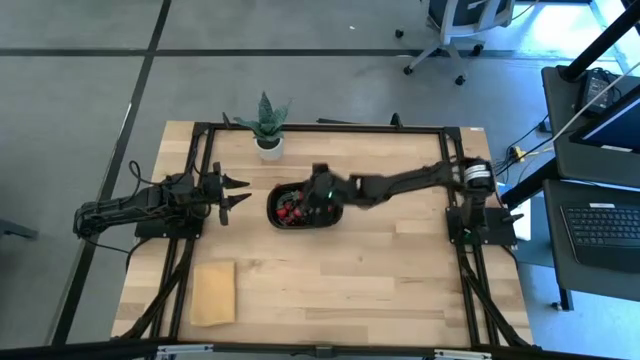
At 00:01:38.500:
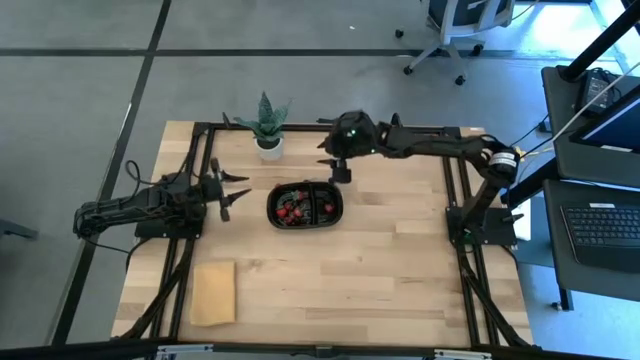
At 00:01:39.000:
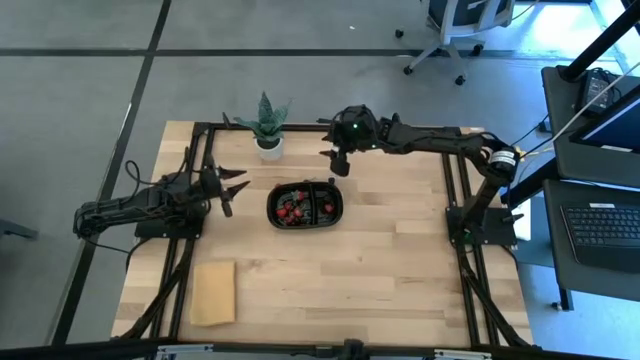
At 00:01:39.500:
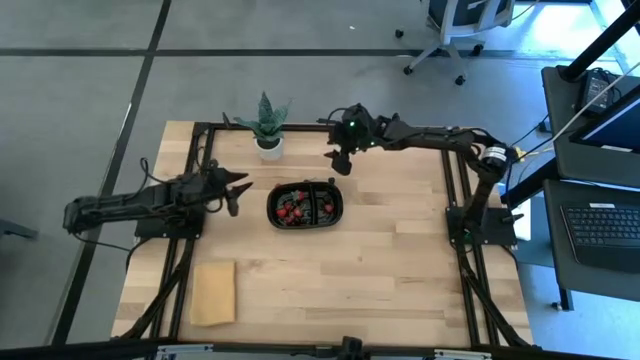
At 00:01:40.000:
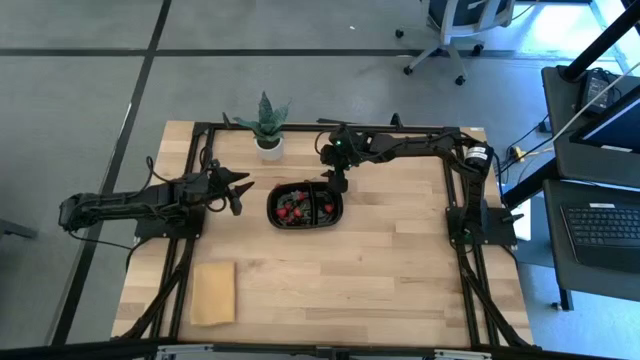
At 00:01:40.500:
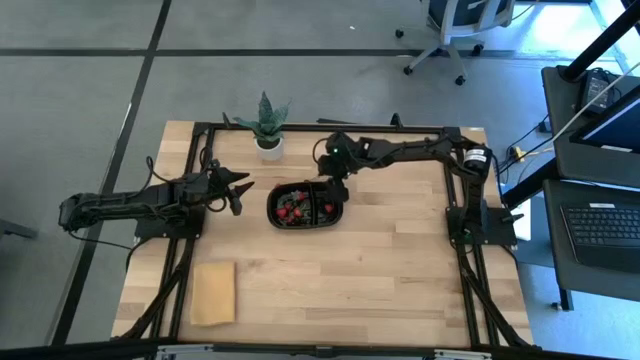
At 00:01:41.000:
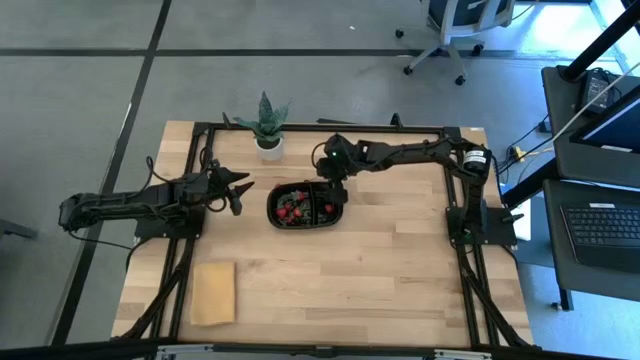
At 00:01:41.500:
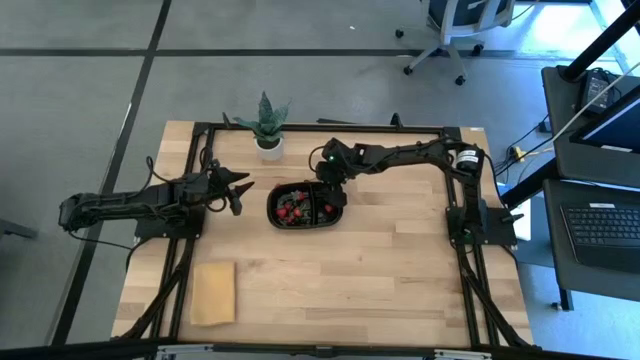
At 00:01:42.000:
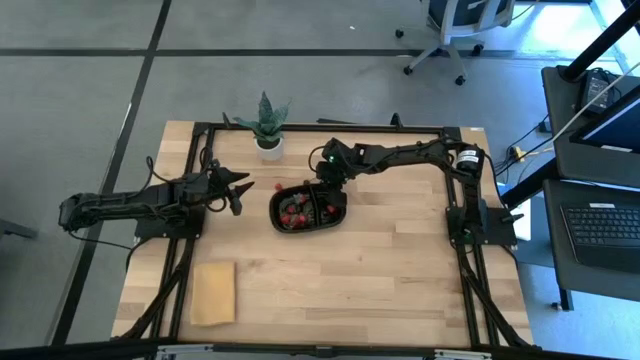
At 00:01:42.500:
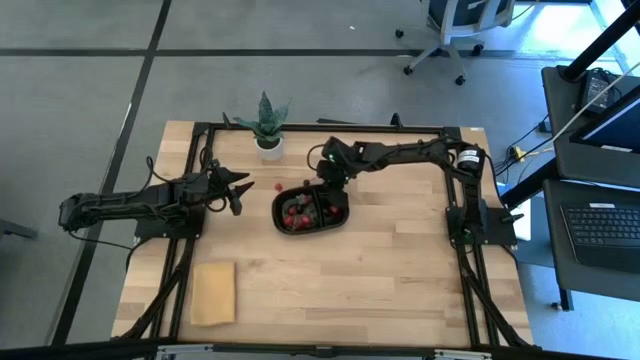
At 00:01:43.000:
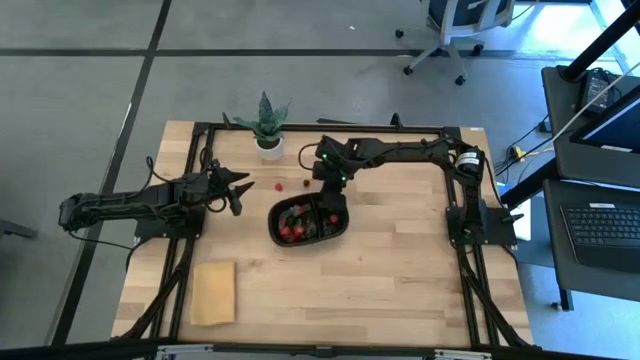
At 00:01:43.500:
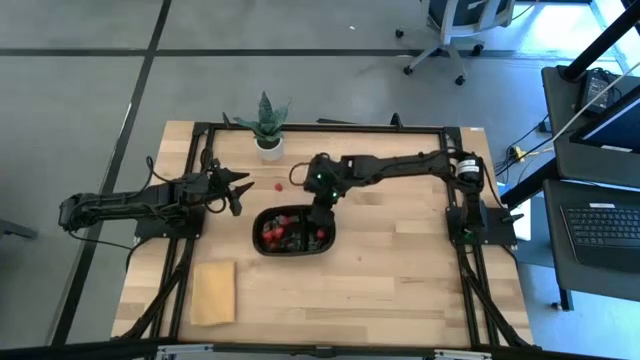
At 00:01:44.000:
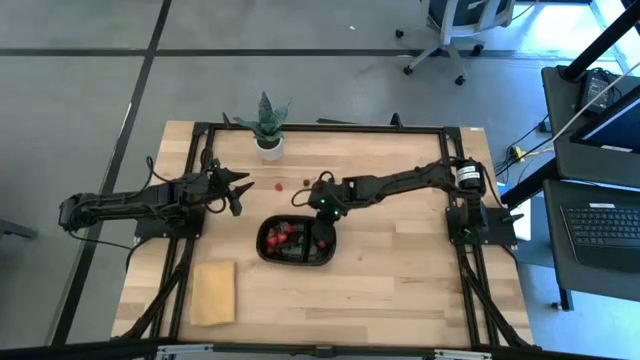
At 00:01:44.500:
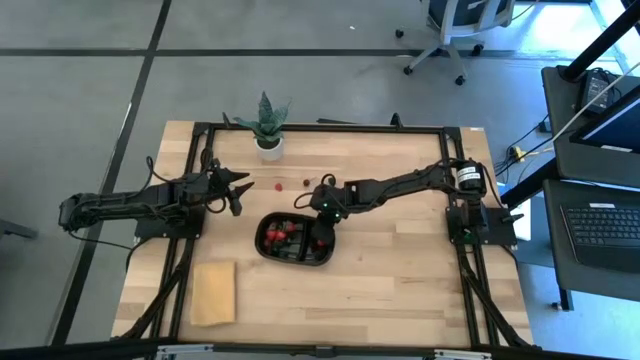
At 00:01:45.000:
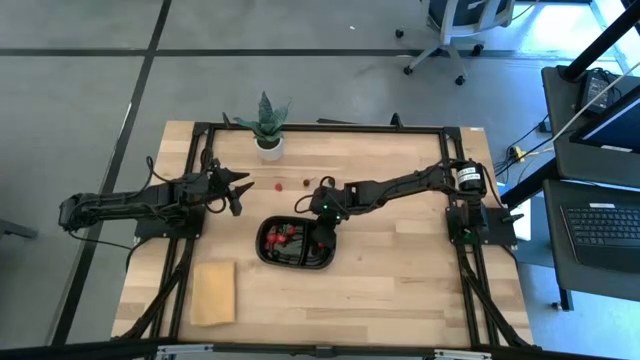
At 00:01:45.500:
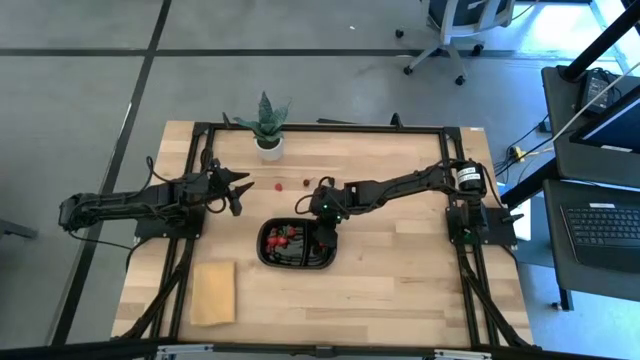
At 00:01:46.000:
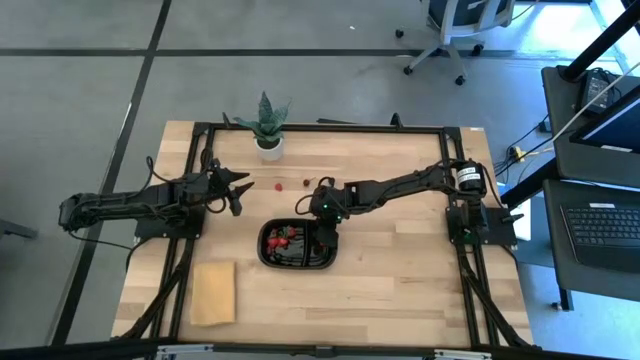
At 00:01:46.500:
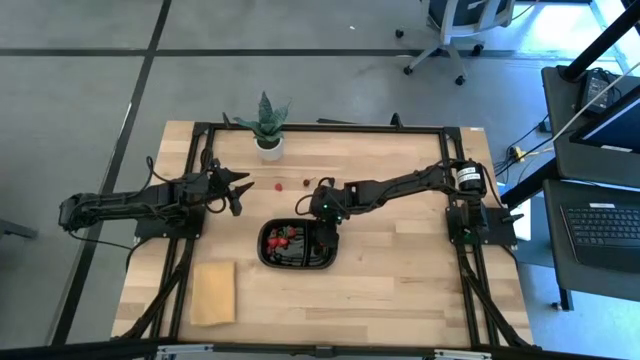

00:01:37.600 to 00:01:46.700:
Task: Pick and placing Produce into tupperware
Move the black bin to the middle left of the table

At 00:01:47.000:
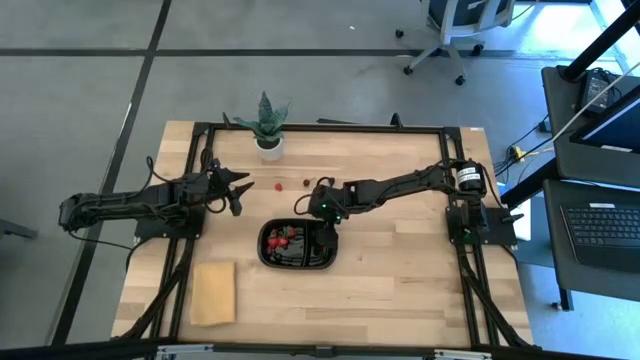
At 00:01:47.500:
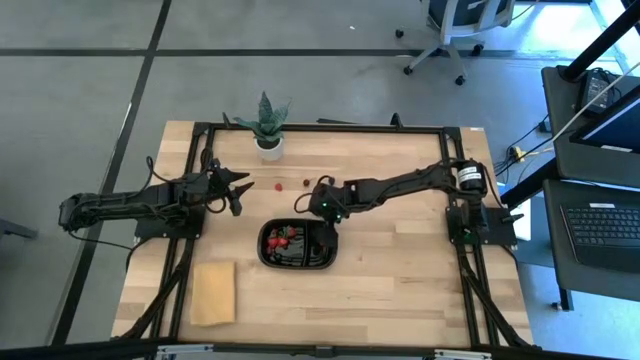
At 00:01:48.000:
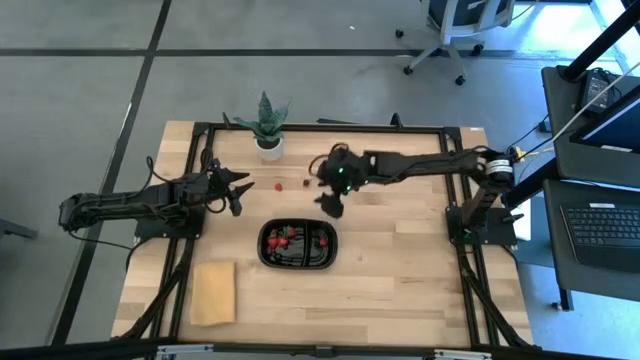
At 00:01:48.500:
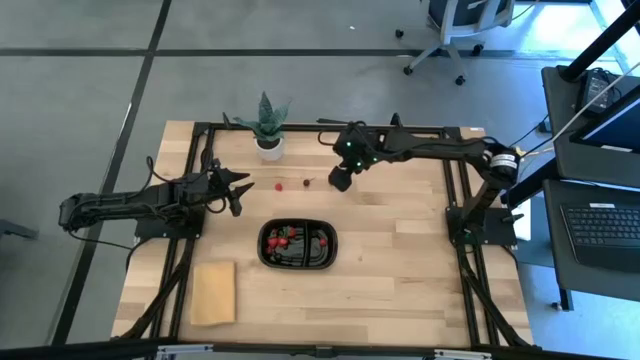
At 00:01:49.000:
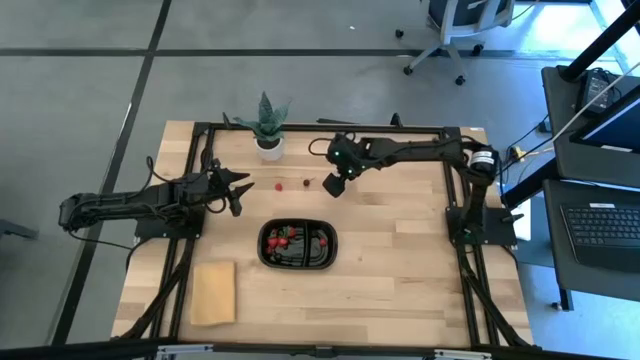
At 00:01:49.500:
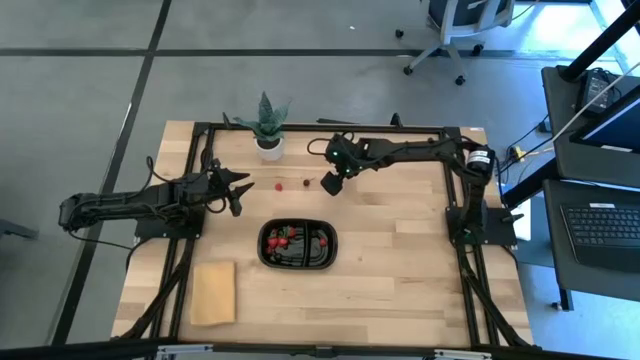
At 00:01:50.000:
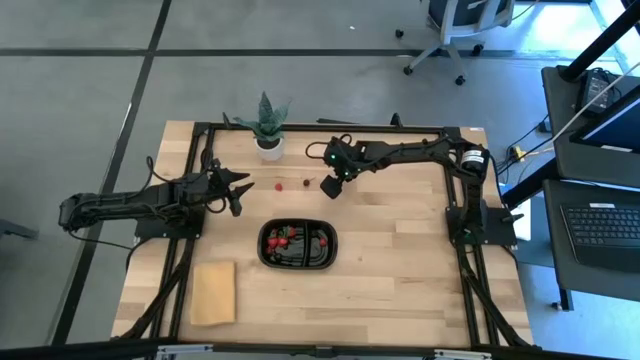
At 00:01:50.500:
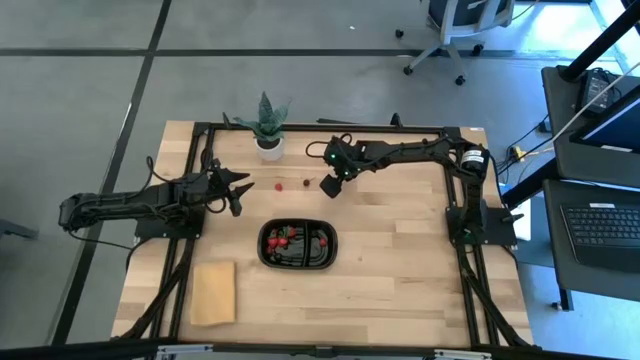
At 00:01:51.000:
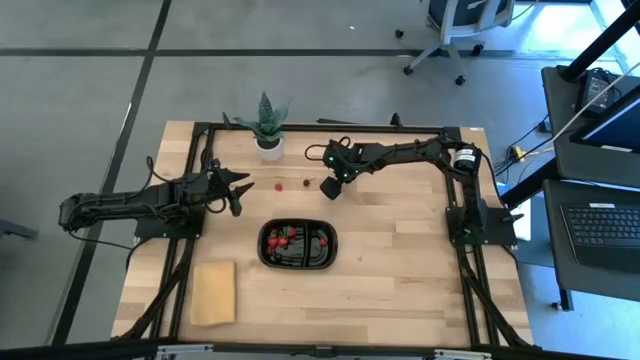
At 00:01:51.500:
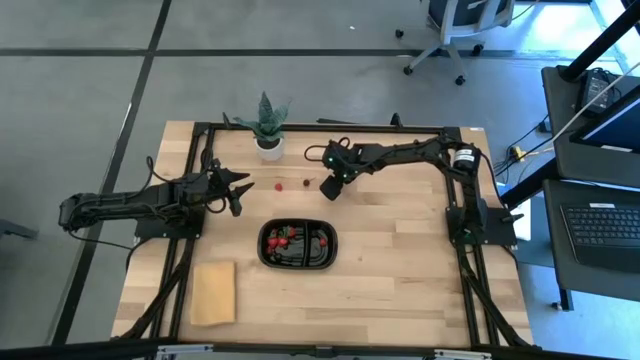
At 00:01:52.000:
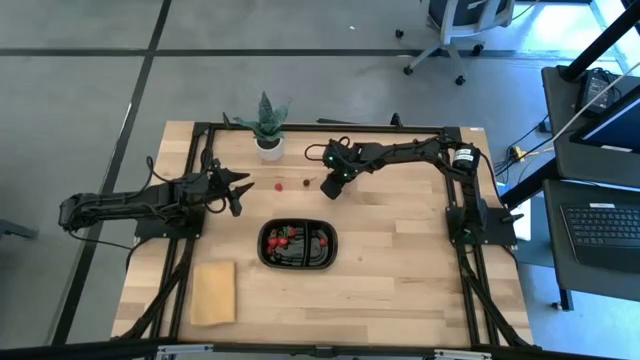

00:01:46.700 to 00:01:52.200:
Put the blackberry into the black bin

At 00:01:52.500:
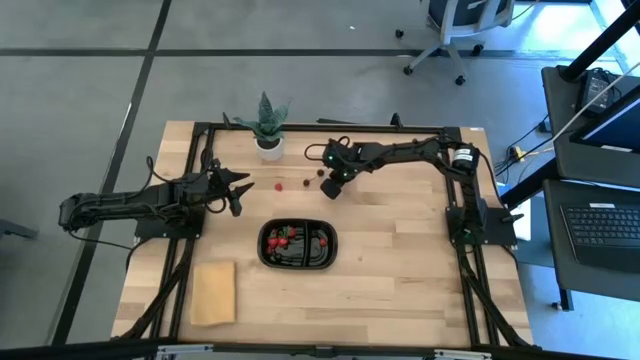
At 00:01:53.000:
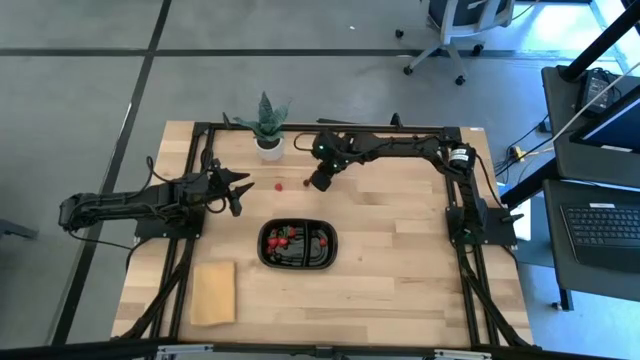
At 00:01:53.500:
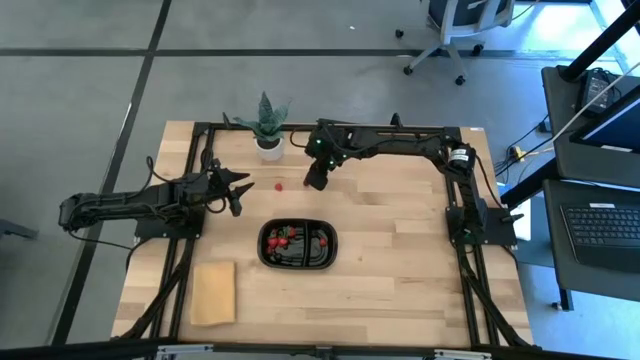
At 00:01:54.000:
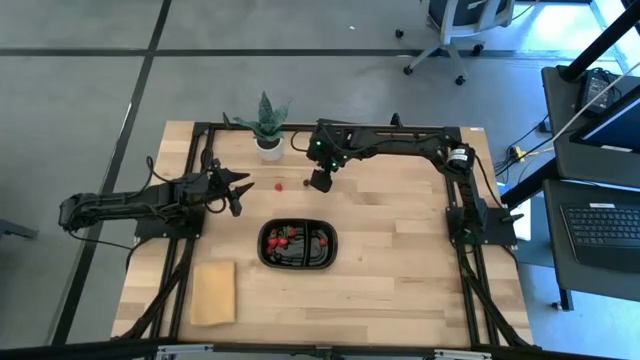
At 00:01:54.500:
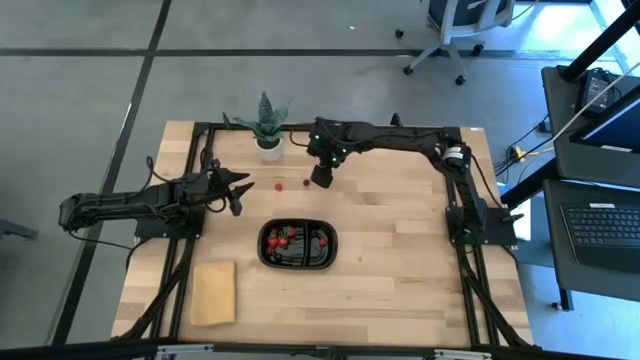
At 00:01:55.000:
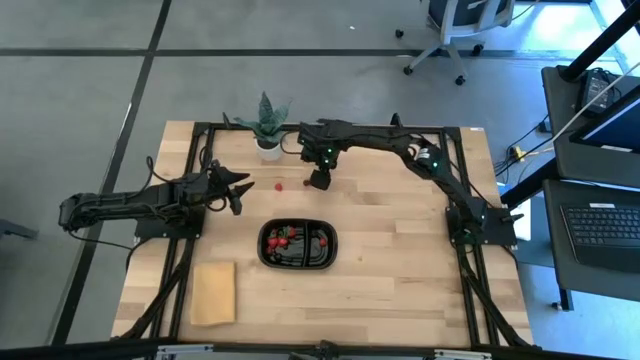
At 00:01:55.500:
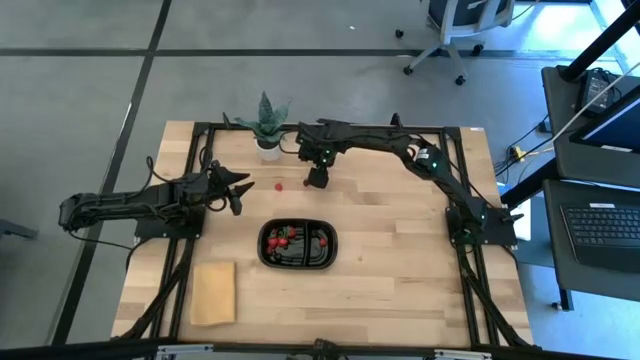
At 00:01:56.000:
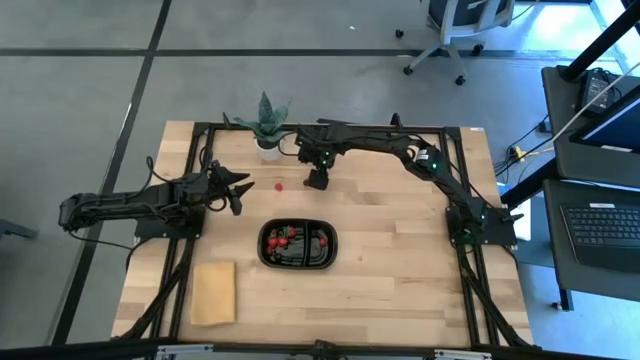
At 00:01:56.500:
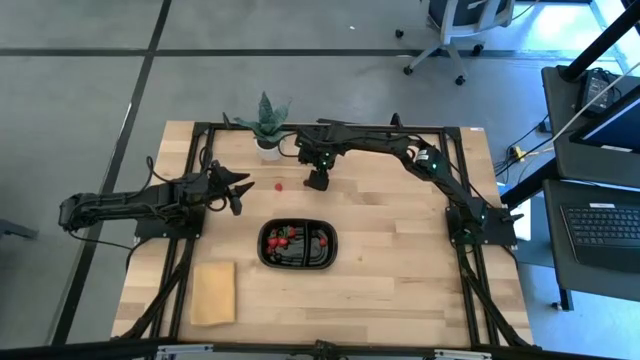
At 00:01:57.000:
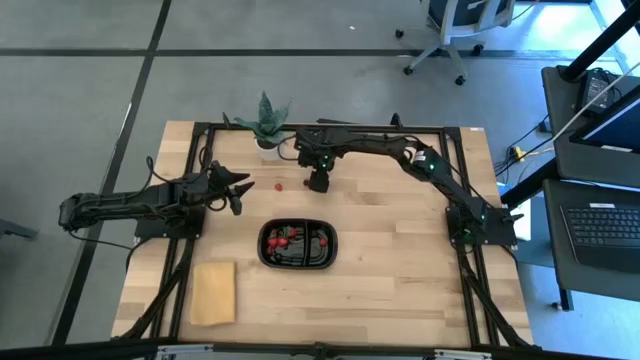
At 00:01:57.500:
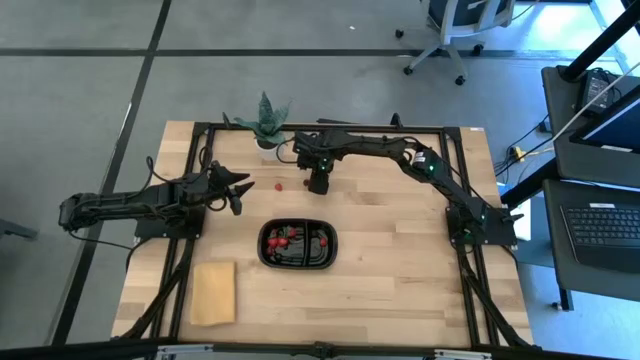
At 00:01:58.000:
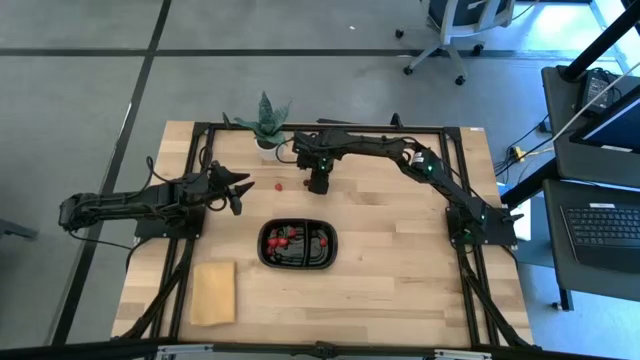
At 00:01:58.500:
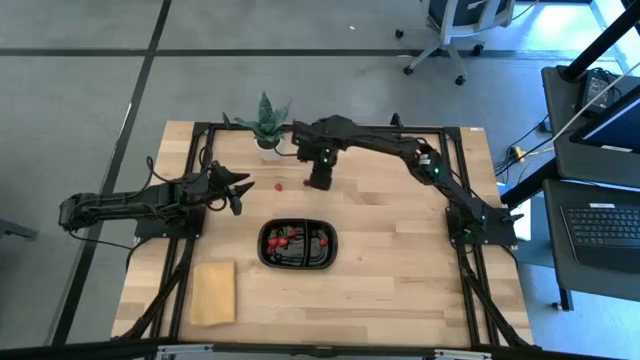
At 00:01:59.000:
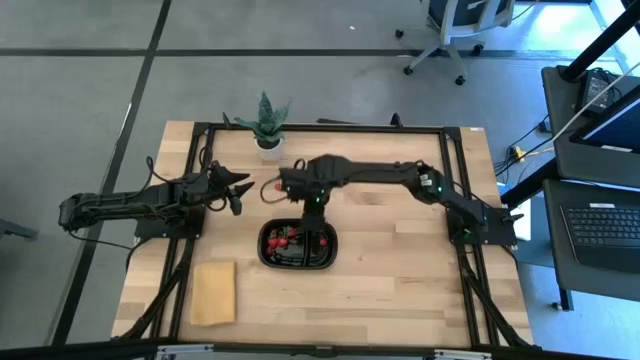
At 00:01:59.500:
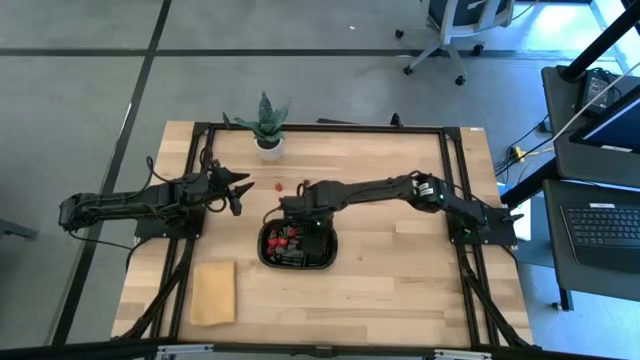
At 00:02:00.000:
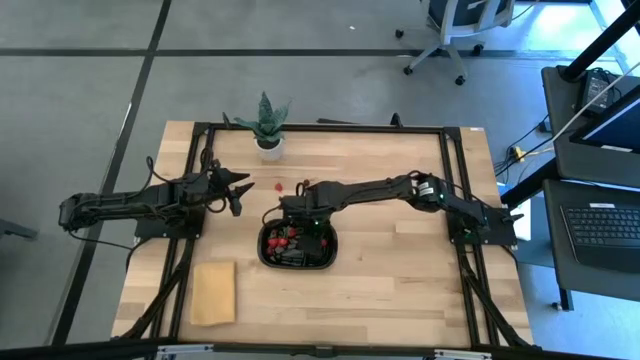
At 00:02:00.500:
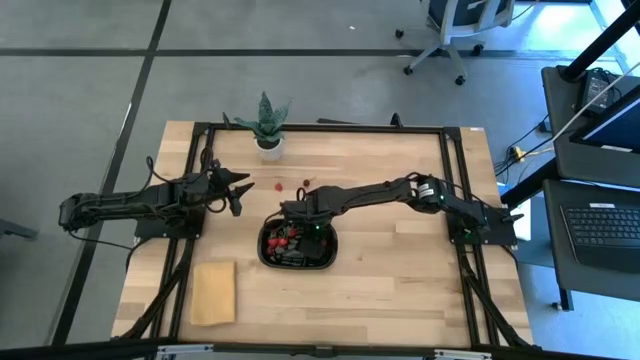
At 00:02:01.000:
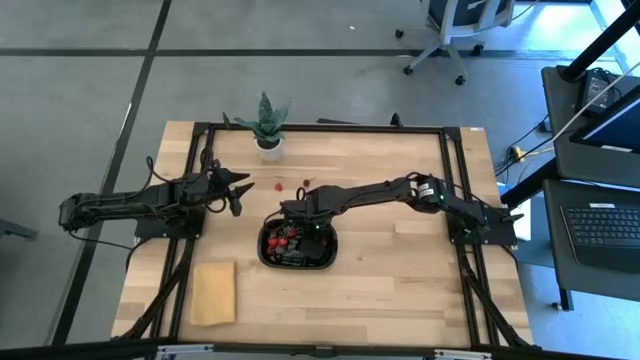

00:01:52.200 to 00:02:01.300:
Put the blackberry into the black bin
